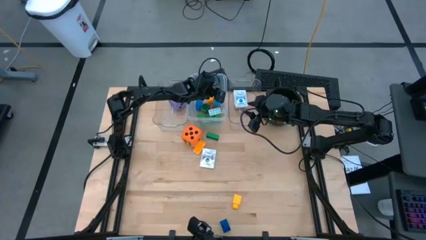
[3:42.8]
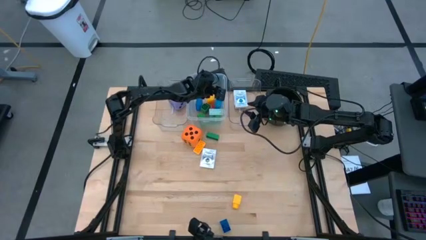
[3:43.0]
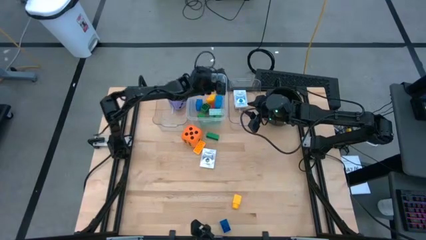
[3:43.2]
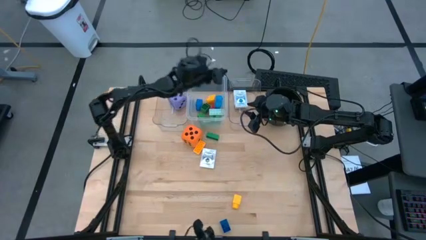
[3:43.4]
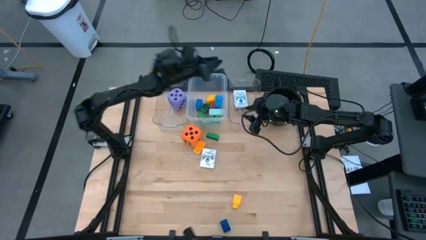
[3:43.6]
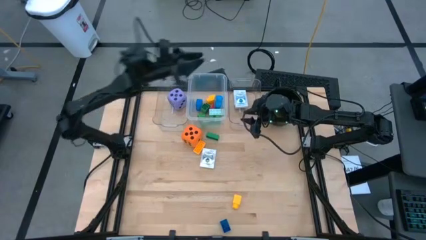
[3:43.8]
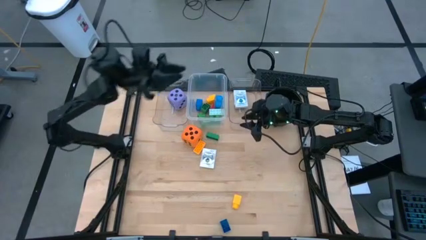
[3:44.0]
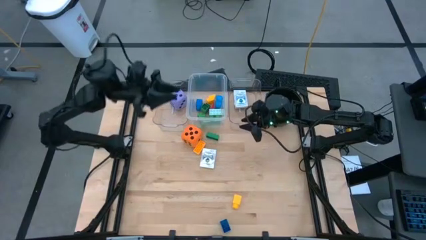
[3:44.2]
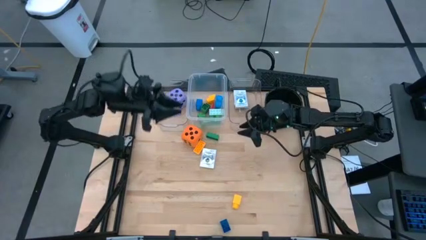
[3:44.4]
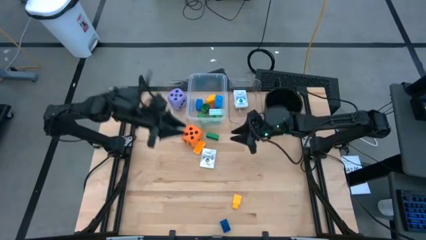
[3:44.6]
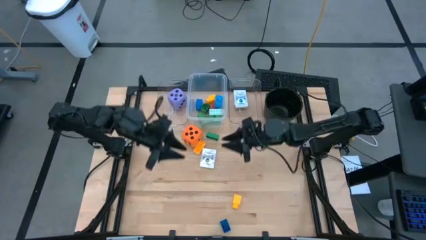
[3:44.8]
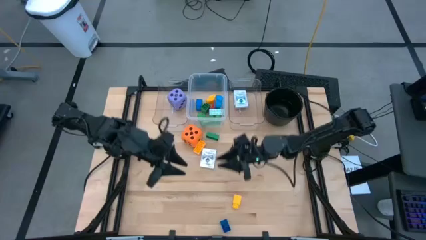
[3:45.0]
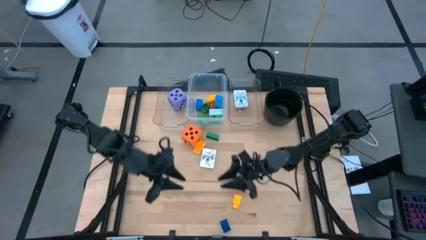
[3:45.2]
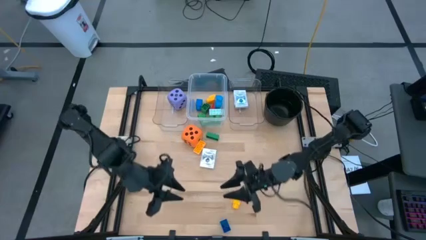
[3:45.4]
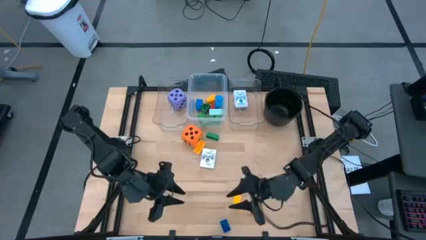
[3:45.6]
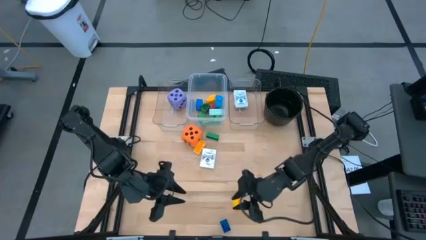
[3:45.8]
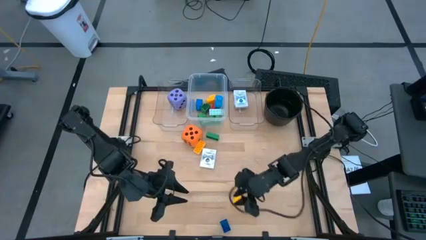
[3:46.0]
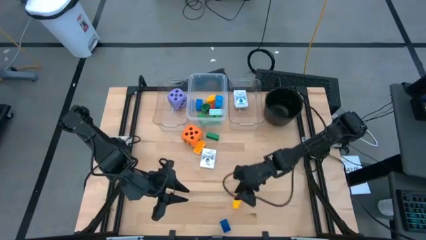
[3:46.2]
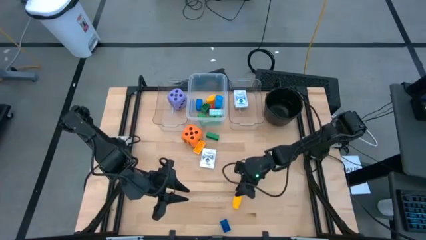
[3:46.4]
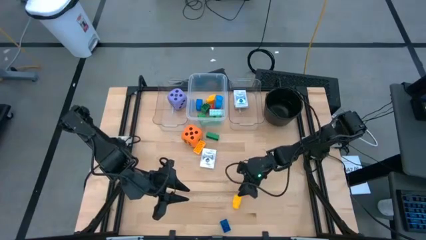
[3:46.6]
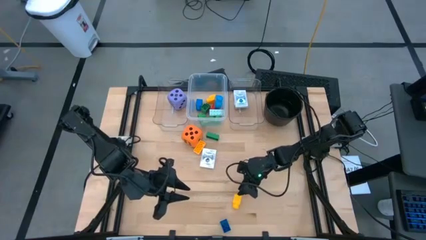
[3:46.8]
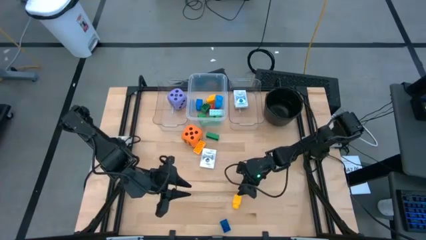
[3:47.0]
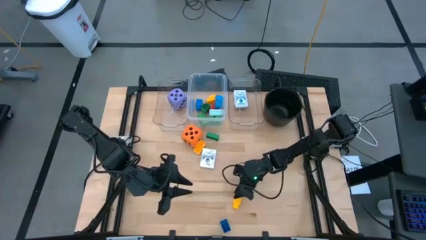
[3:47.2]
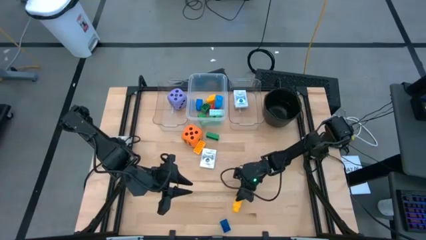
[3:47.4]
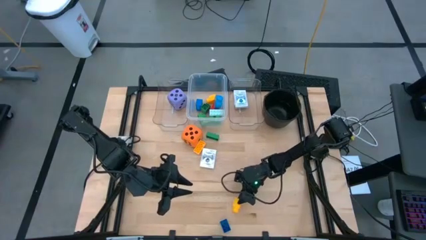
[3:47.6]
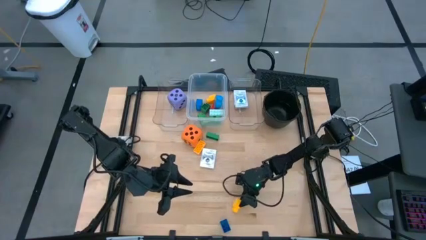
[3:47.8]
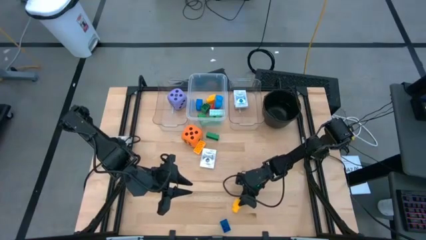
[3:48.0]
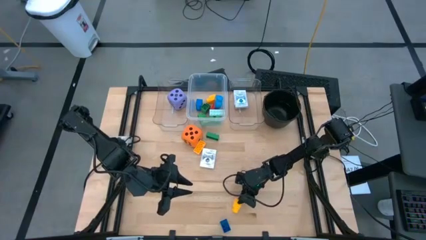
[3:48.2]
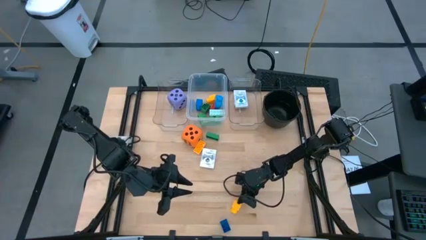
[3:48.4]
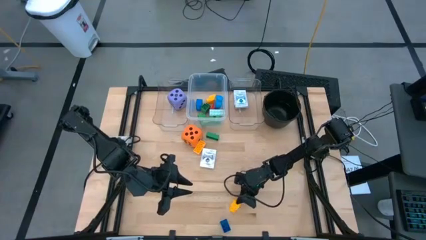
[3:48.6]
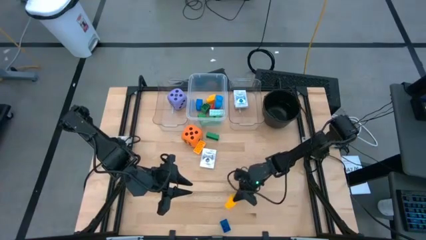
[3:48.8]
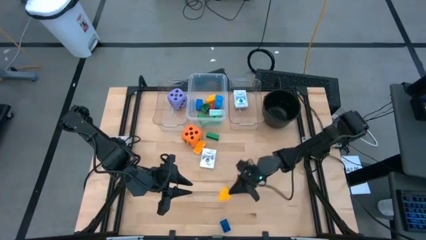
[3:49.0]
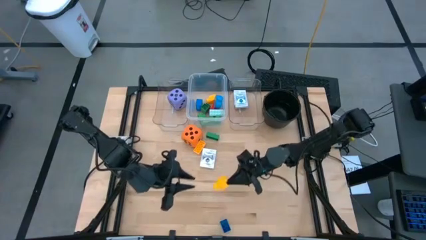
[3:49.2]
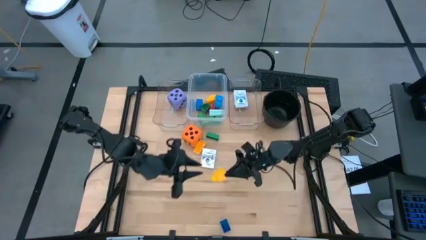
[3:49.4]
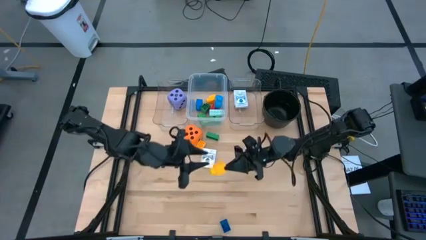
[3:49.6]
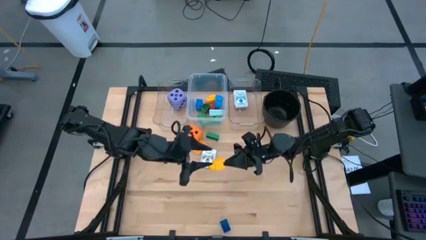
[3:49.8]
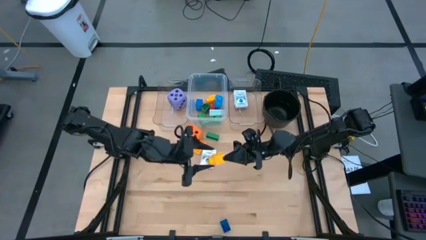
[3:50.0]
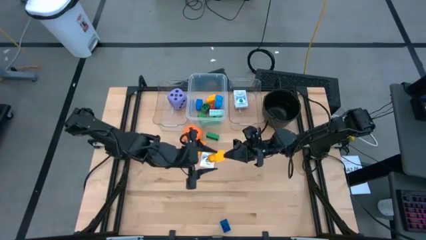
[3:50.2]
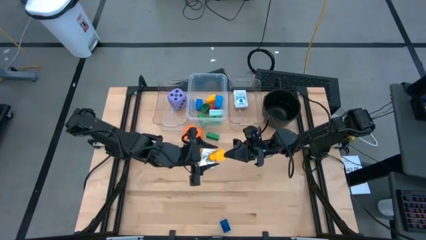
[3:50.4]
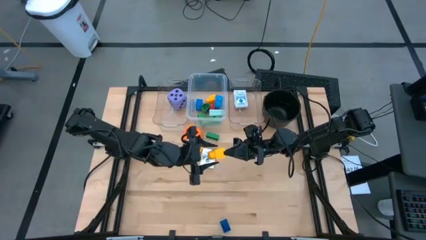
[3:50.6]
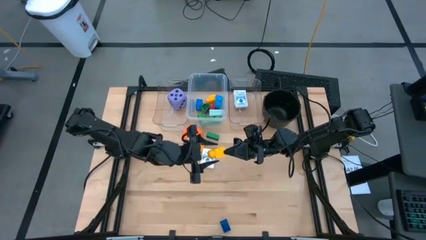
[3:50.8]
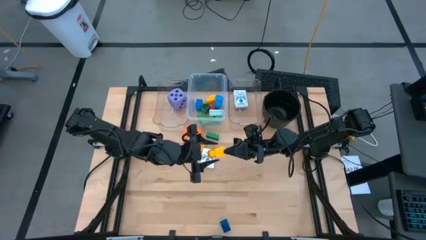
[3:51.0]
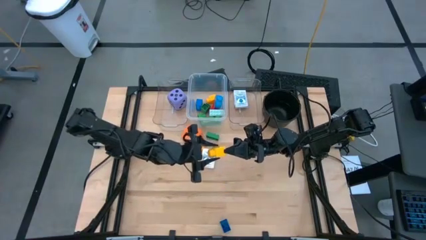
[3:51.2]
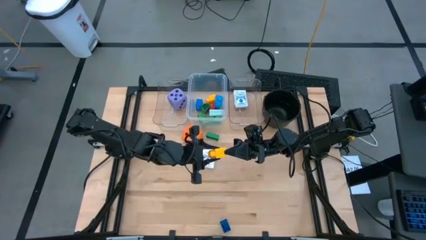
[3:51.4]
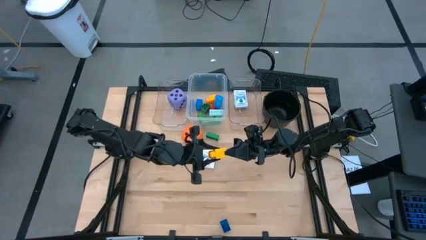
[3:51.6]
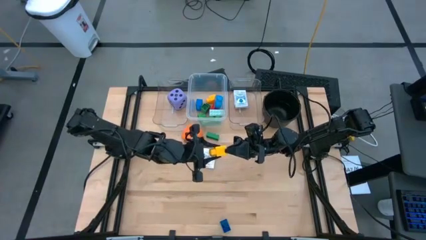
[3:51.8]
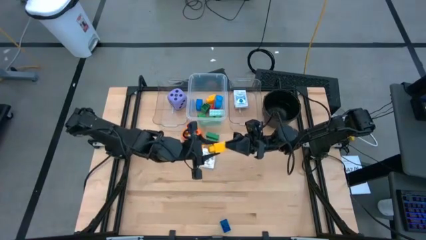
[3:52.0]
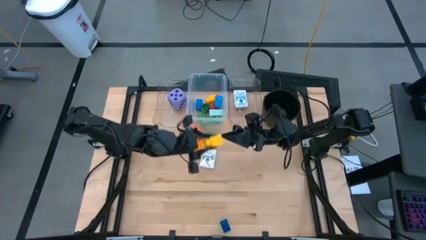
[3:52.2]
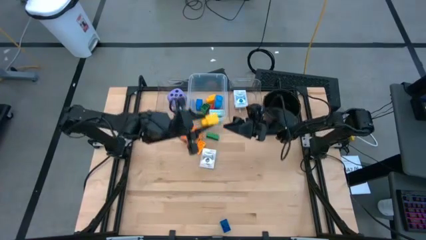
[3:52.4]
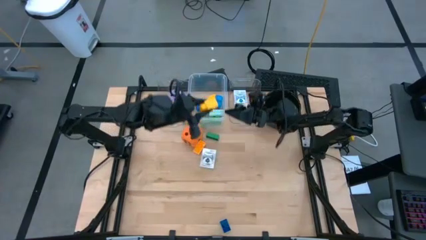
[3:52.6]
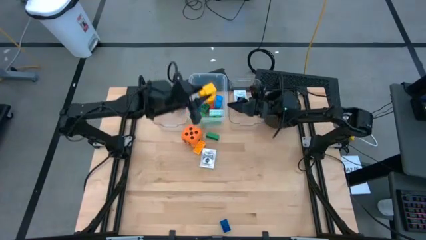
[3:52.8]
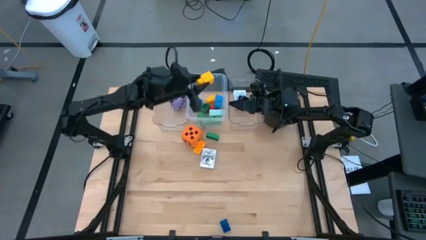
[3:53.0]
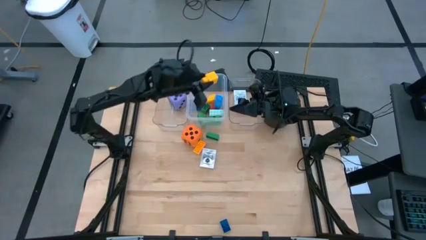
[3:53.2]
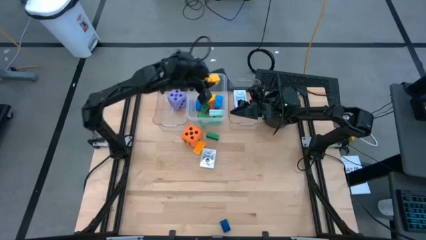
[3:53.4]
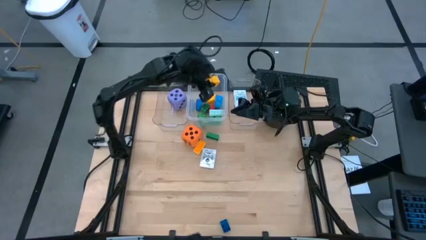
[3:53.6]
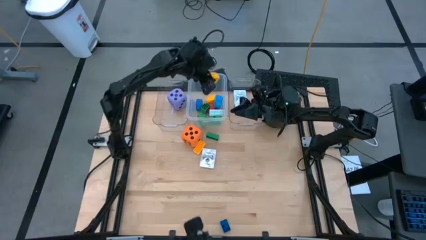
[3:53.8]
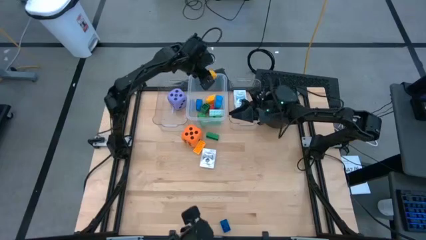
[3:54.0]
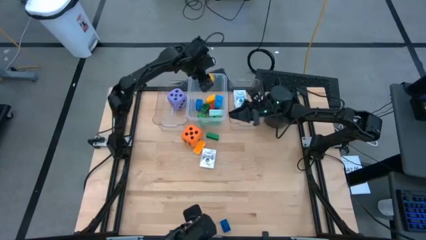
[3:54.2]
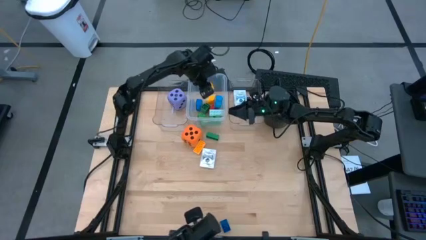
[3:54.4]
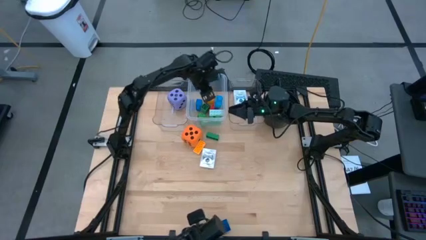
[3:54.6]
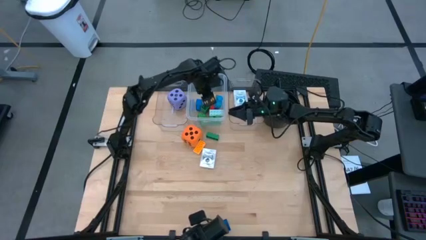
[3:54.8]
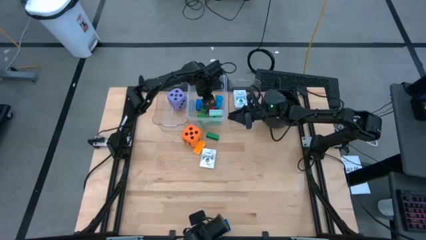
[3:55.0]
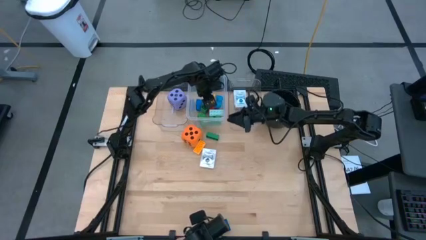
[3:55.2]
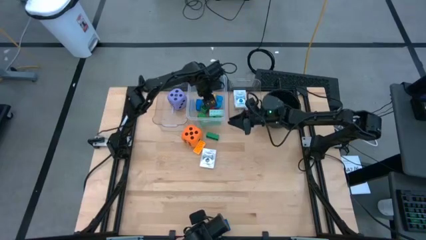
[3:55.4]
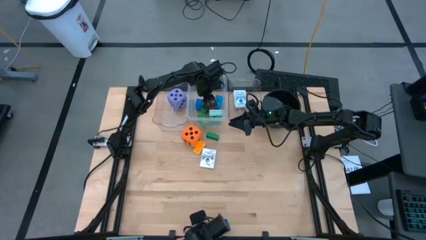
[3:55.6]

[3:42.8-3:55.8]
Task: Pick & Place Toys
Put the yellow one stud game piece into the middle transparent bin

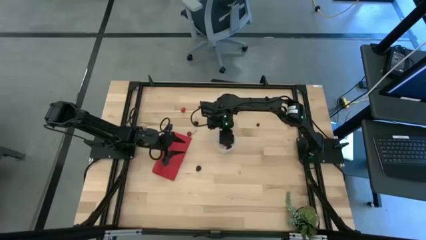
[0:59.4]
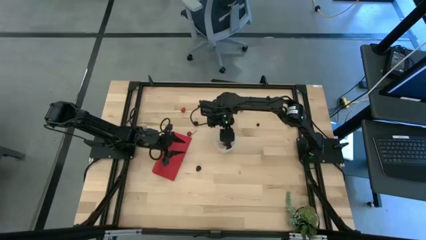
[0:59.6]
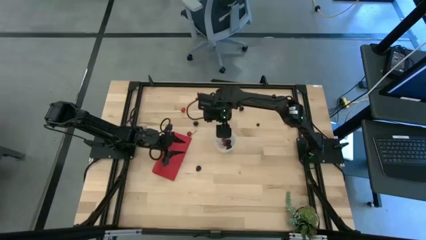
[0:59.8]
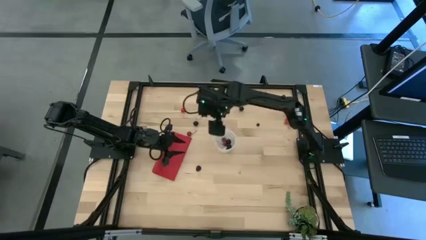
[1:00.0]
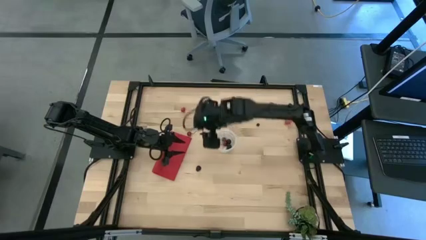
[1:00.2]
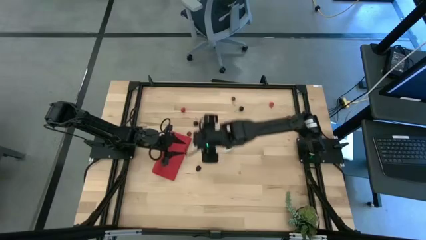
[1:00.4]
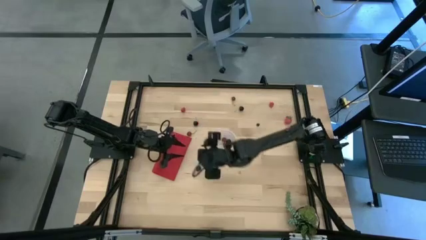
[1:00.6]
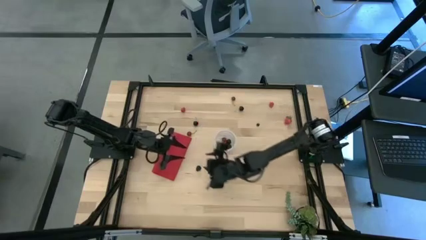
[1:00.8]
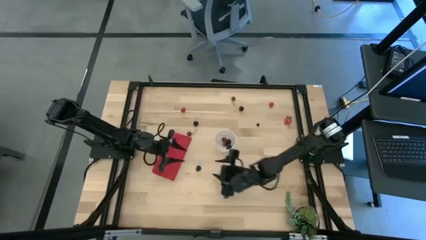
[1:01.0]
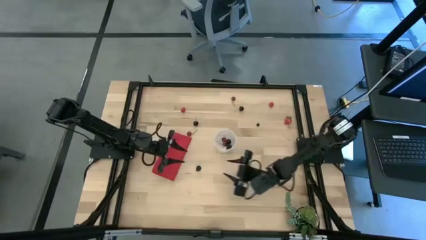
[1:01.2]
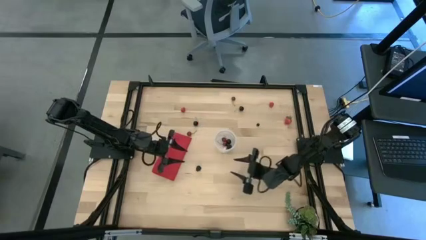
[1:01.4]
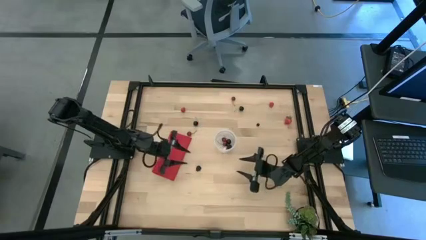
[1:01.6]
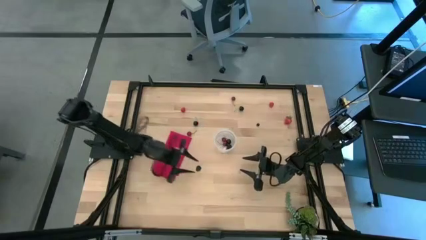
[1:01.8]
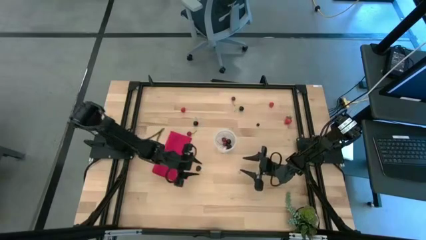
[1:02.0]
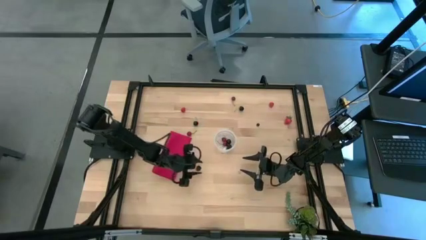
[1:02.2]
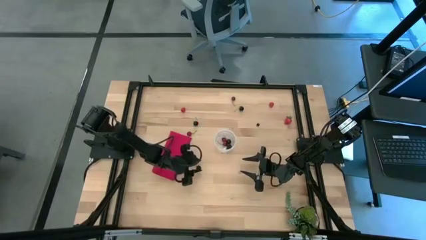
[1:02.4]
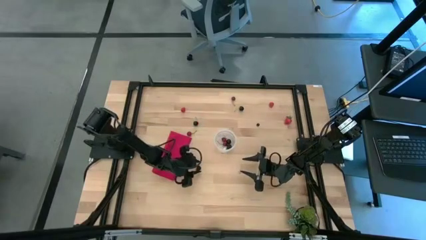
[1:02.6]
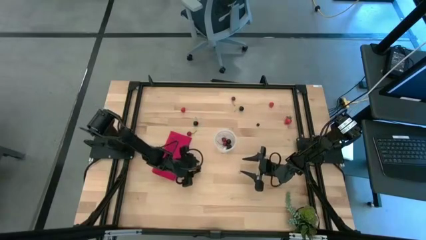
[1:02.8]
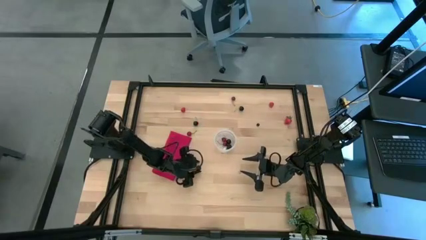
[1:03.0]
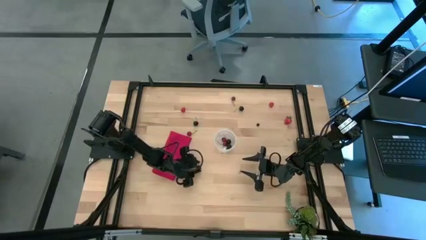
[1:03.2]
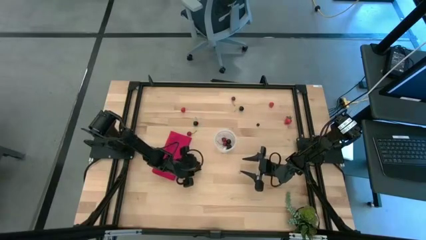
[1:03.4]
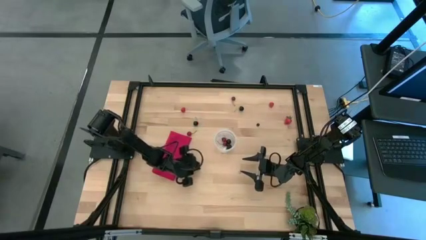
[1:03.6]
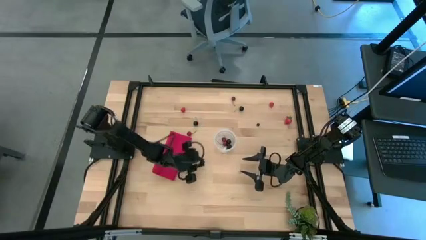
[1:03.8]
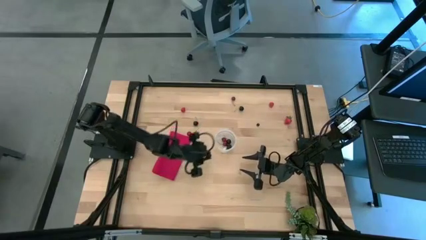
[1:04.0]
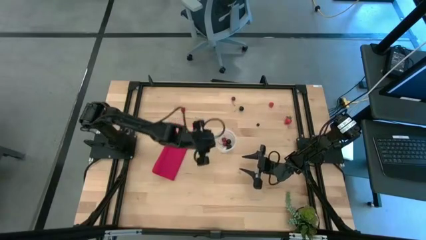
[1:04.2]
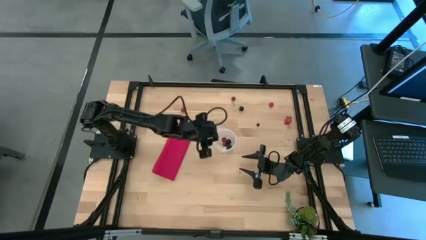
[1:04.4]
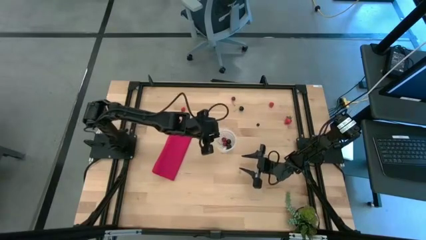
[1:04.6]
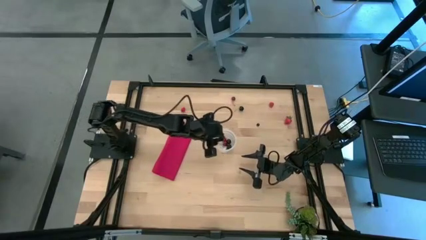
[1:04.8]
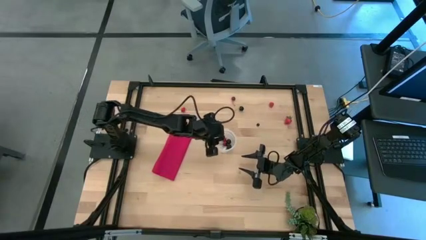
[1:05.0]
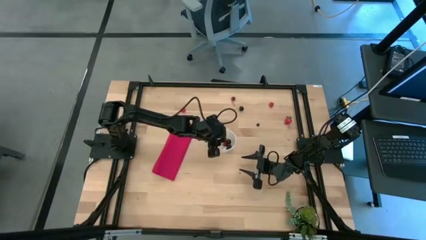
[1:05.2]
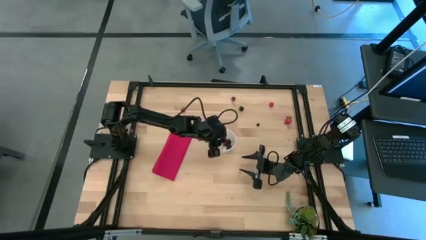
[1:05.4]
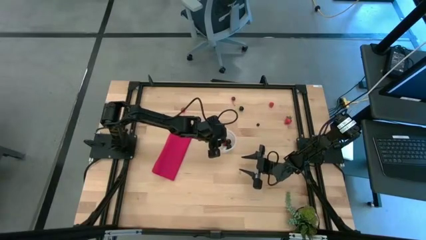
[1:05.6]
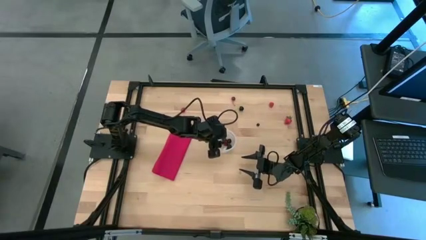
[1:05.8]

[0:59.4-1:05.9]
Task: Pick and placing Produce into tupperware
Put the blackberries into the transparent bin
